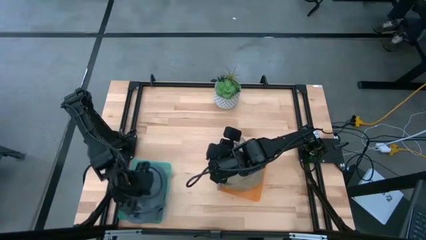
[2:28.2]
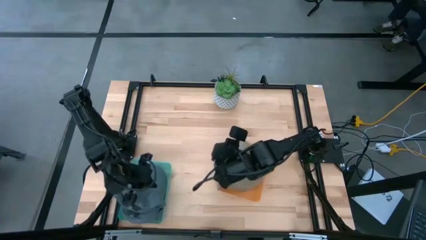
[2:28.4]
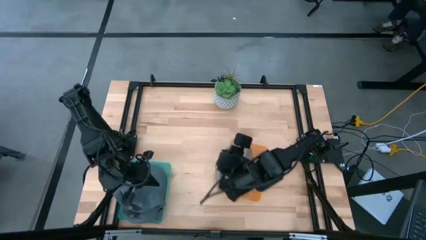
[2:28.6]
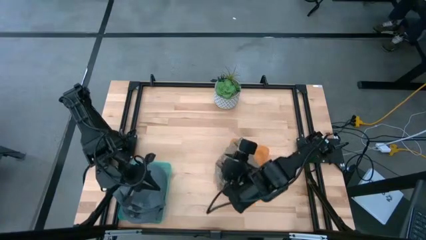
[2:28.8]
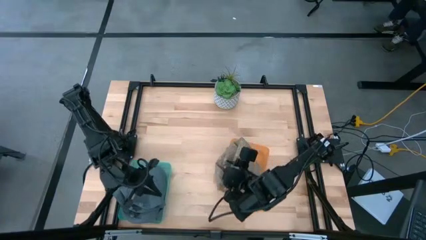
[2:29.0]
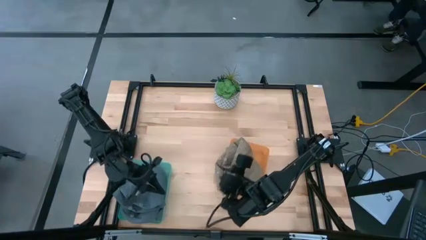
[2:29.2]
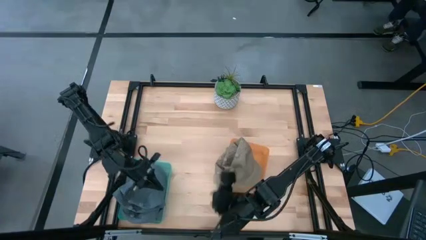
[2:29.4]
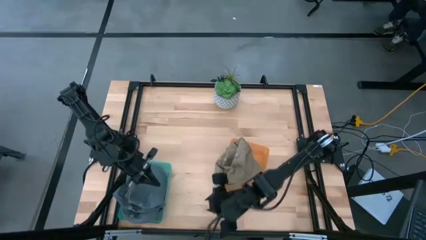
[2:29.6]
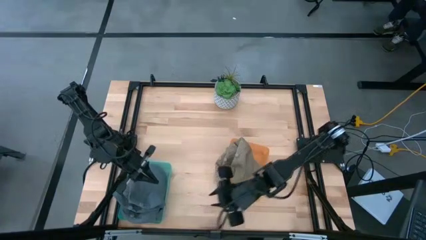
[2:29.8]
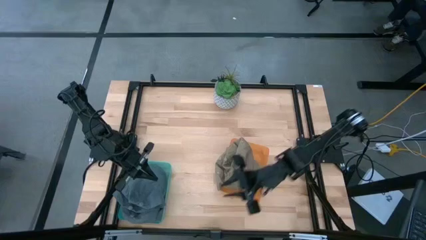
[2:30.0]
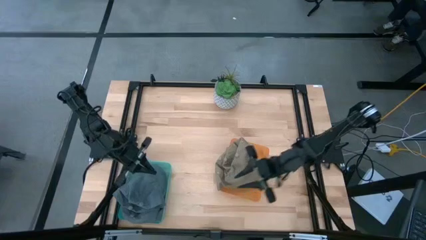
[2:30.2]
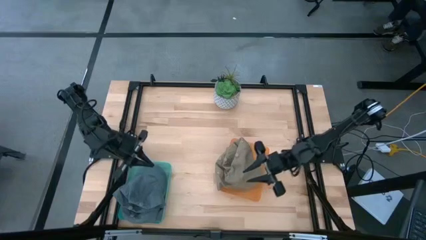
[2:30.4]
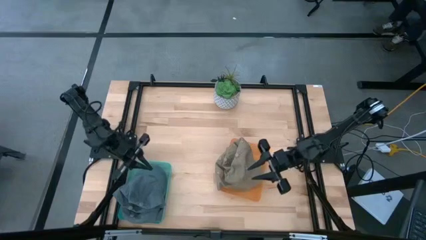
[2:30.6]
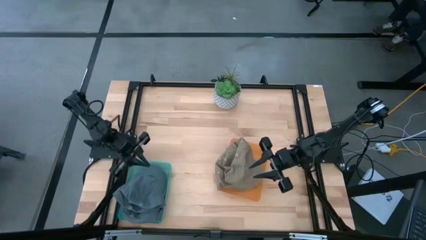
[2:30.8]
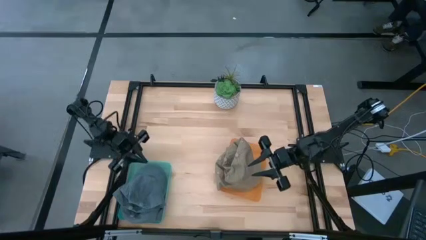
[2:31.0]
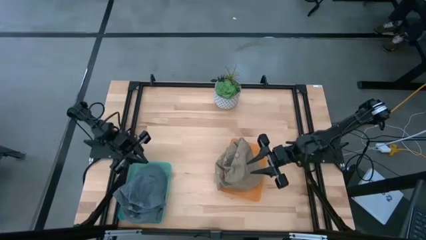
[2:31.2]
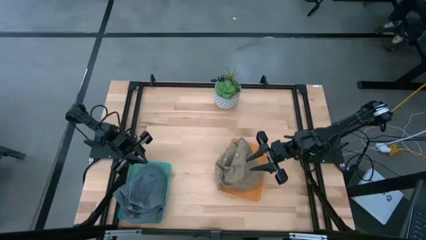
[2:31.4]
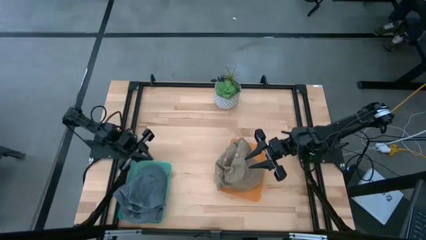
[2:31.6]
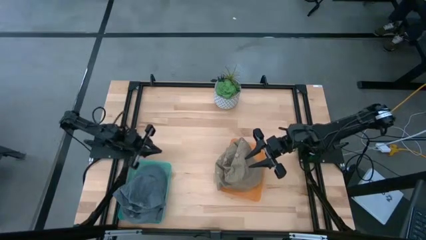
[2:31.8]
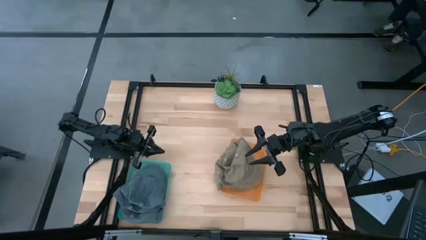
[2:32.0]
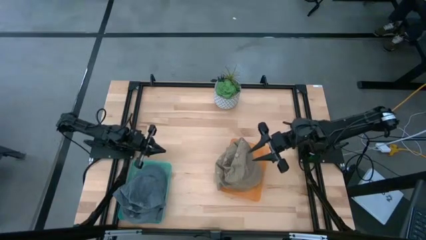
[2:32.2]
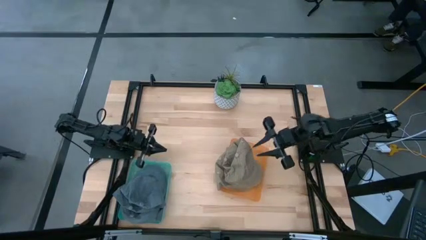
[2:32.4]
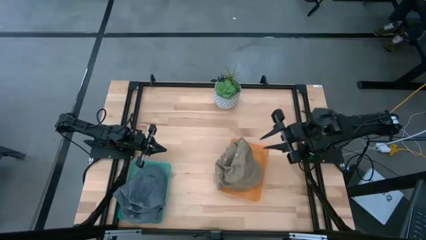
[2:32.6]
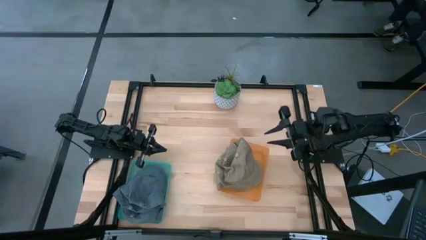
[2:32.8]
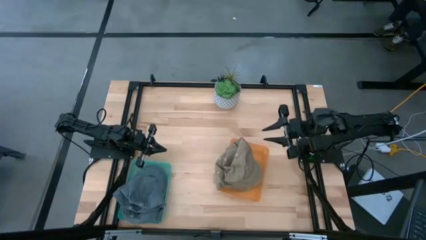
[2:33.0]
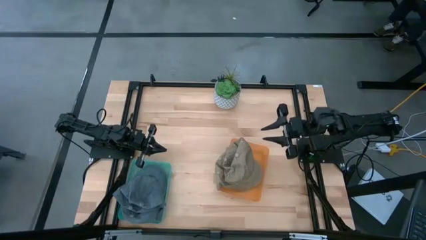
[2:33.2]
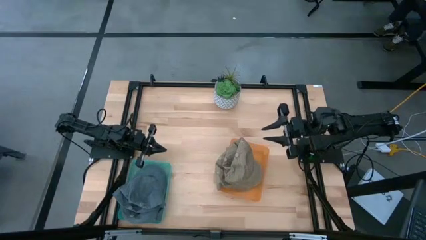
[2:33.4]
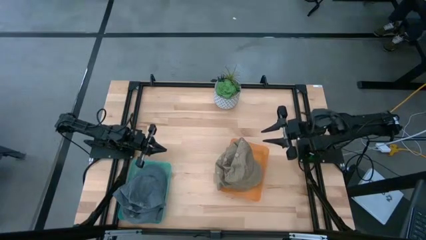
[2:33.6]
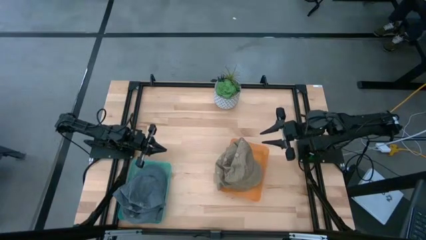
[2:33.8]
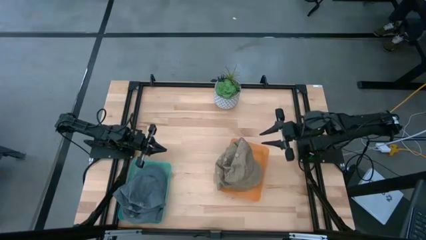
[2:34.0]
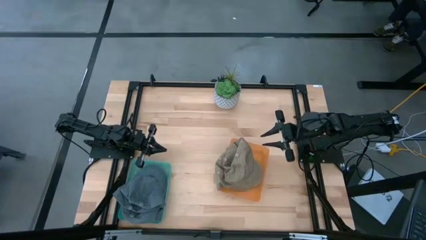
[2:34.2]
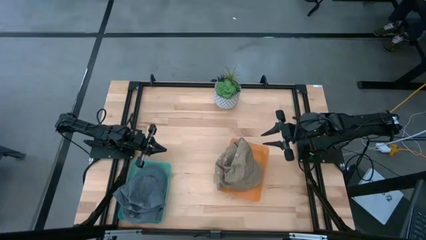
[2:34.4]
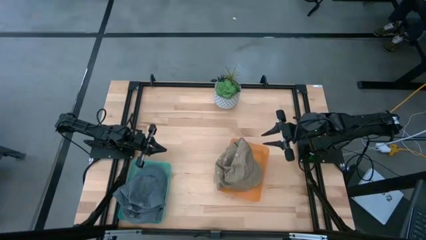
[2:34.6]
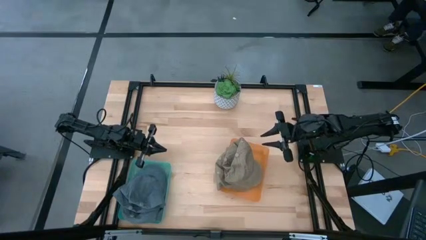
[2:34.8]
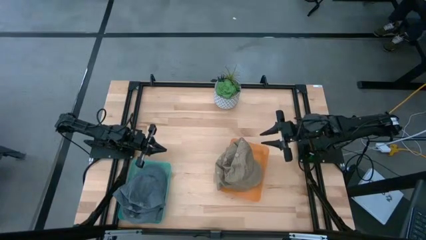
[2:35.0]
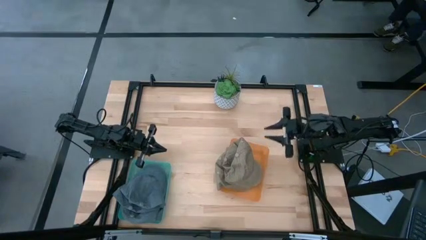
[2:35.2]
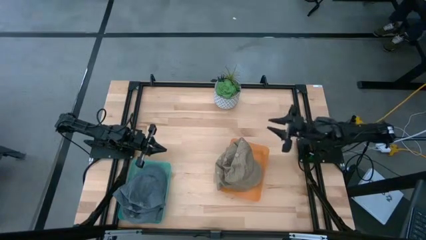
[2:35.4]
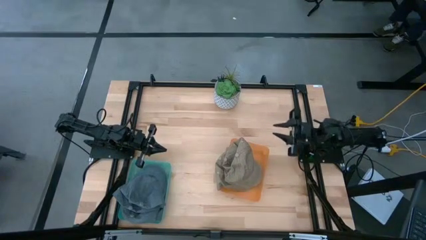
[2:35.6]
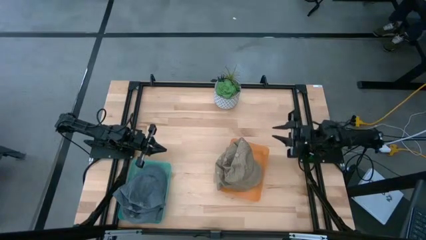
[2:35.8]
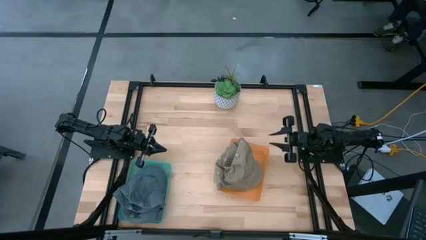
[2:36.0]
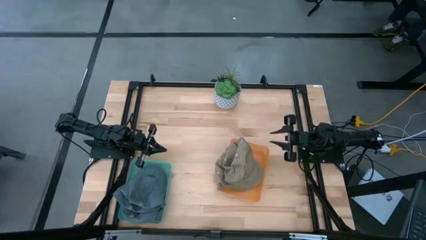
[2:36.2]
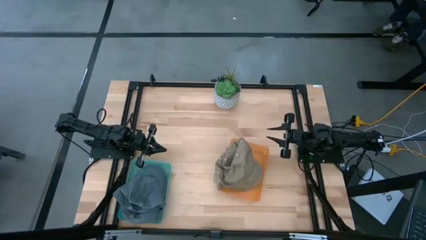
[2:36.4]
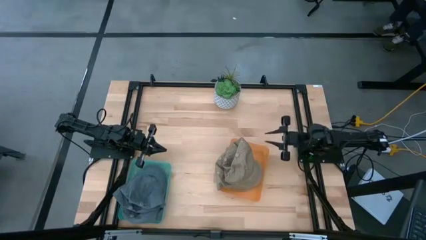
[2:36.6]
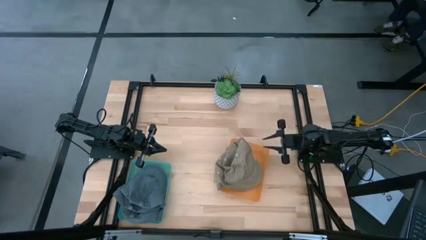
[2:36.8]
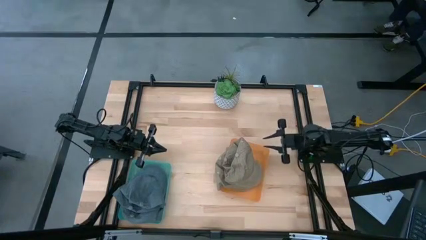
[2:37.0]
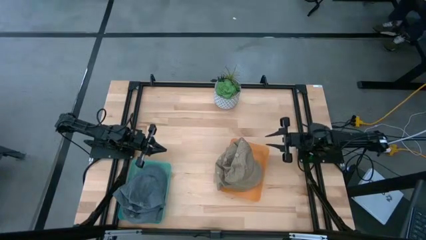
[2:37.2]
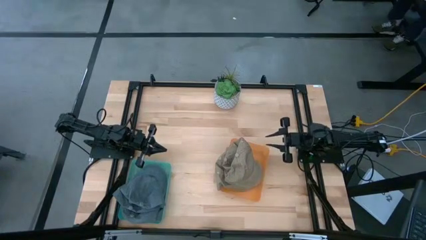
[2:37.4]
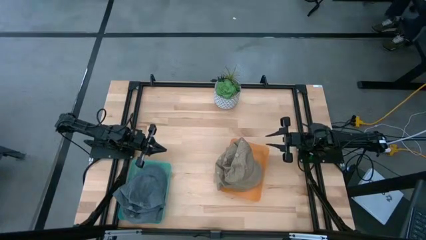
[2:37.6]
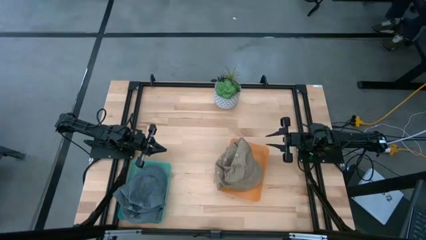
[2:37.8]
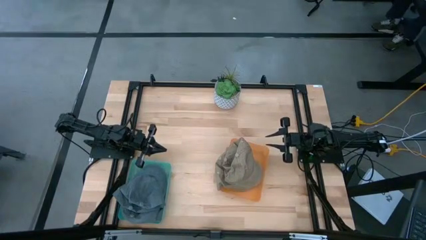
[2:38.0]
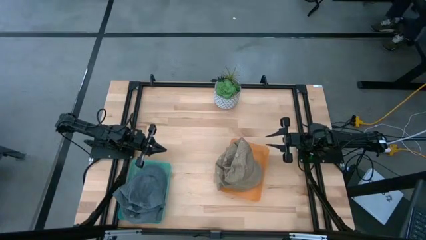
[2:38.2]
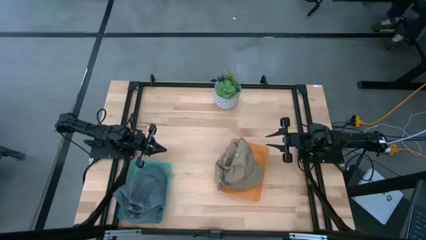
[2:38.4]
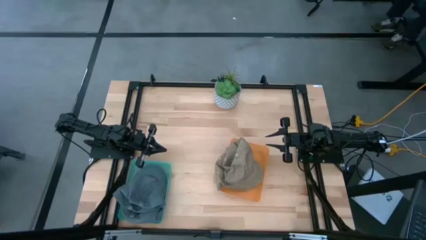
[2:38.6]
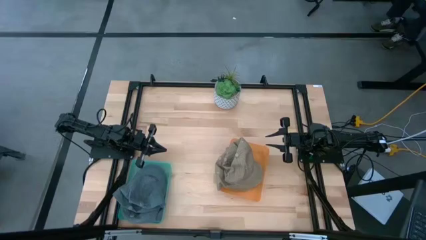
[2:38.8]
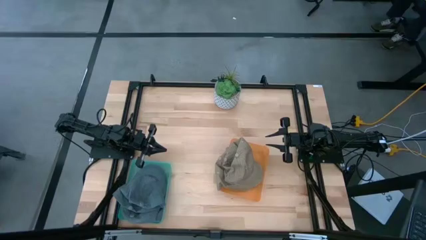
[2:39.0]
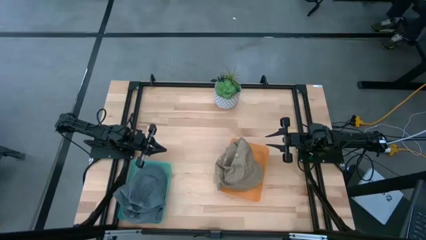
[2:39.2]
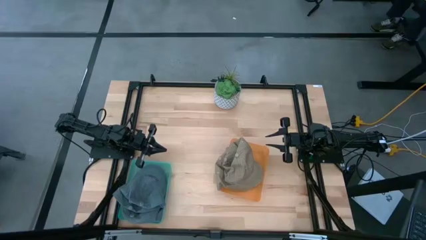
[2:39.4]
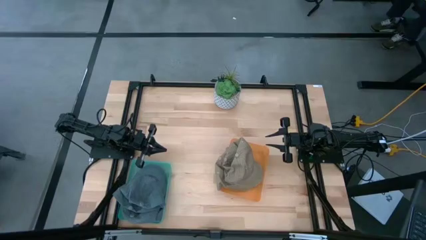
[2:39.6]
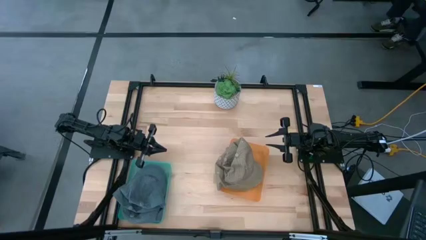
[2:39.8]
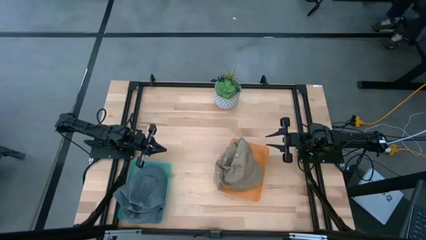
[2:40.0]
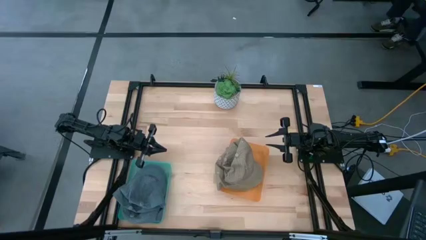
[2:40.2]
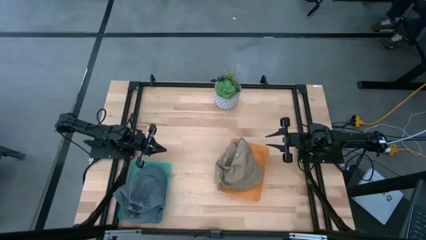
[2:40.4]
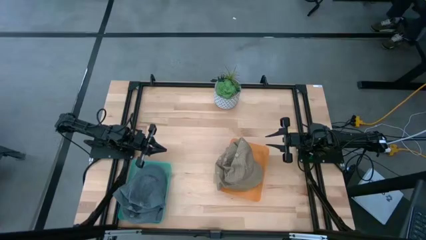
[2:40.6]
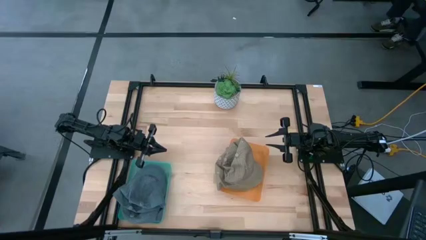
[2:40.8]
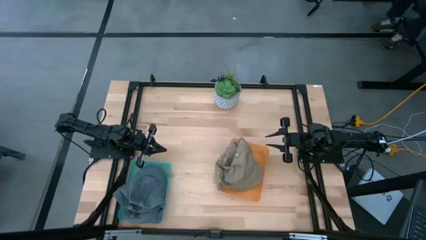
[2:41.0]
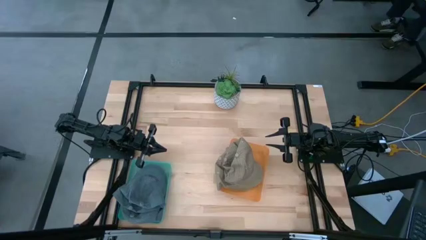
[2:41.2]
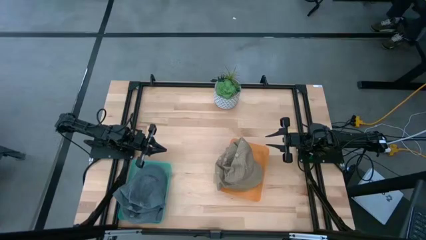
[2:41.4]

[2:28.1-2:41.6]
Task: Pick & Place hat
Return to Home Position

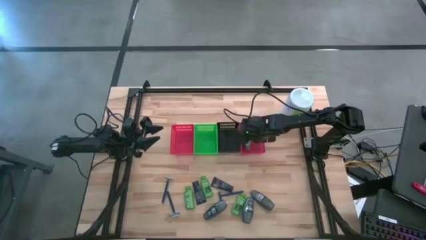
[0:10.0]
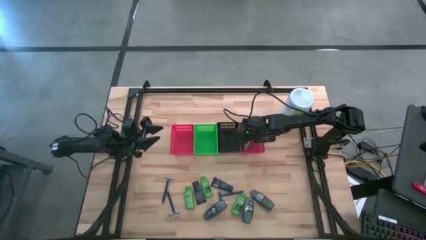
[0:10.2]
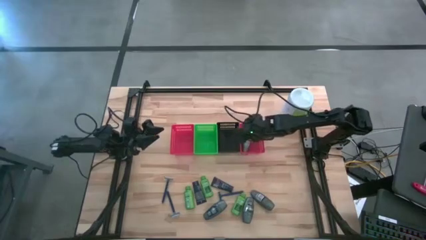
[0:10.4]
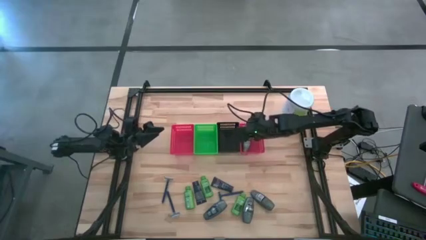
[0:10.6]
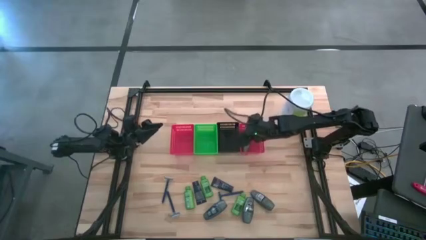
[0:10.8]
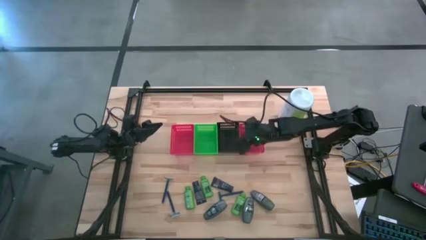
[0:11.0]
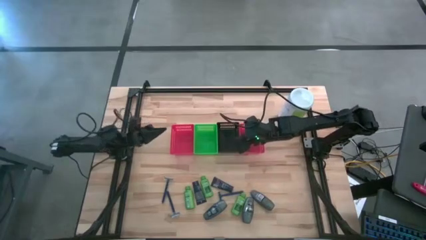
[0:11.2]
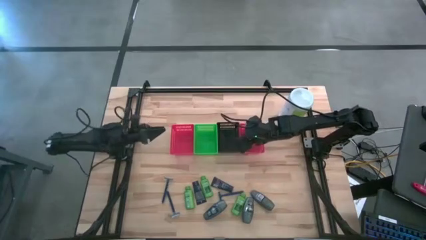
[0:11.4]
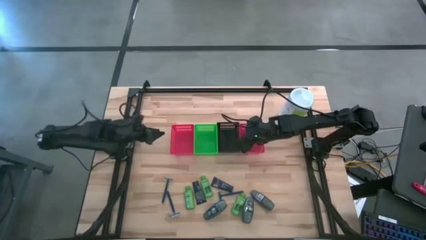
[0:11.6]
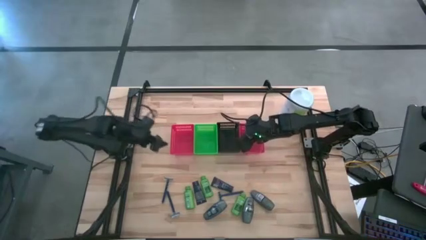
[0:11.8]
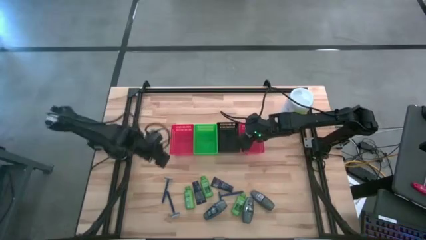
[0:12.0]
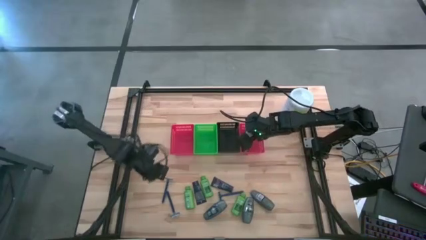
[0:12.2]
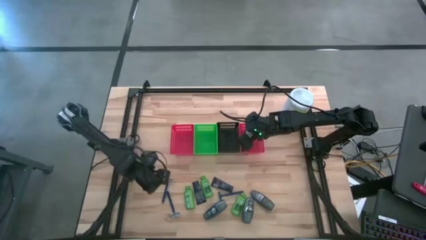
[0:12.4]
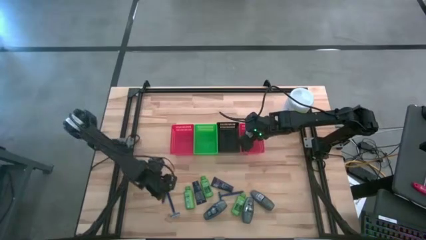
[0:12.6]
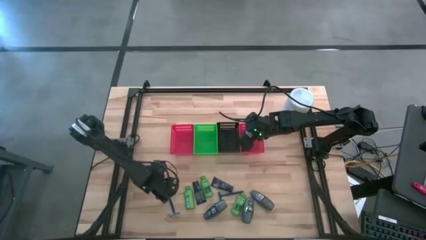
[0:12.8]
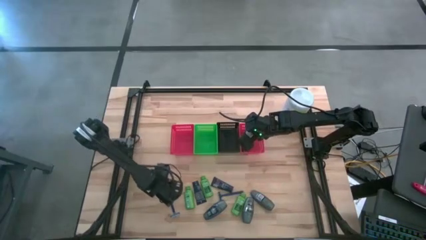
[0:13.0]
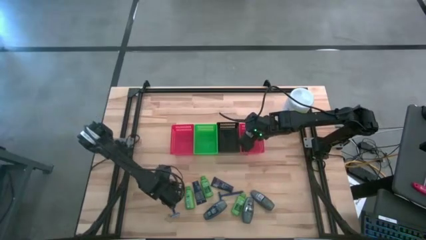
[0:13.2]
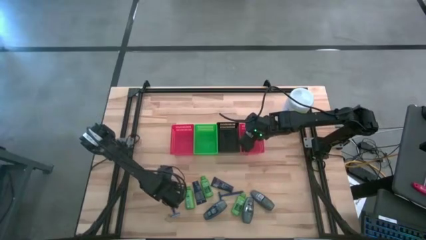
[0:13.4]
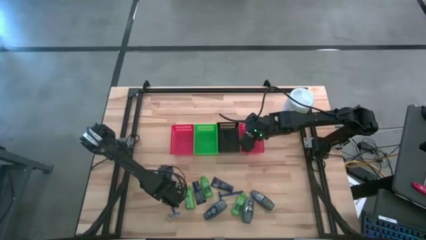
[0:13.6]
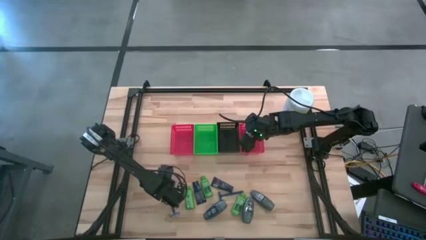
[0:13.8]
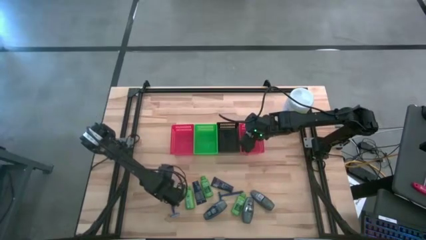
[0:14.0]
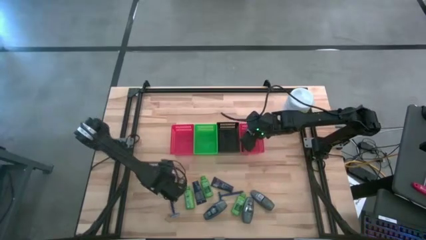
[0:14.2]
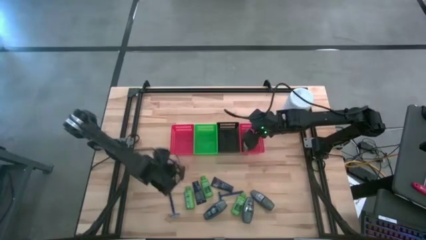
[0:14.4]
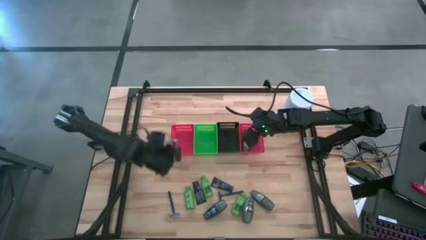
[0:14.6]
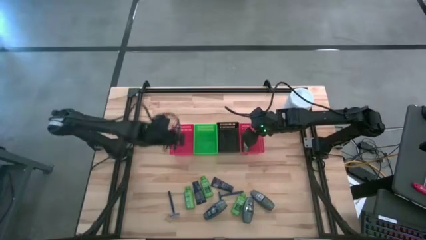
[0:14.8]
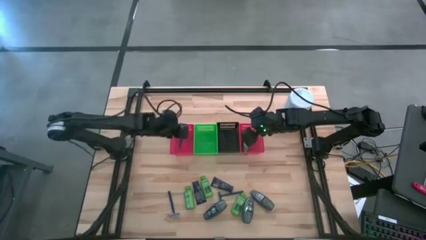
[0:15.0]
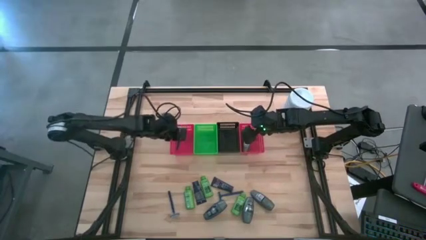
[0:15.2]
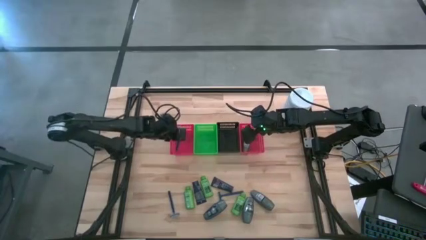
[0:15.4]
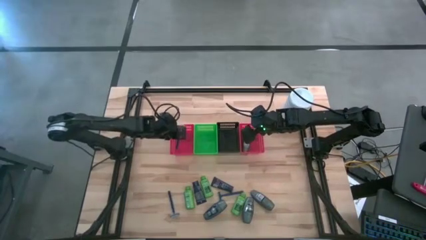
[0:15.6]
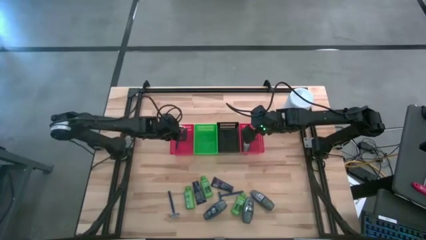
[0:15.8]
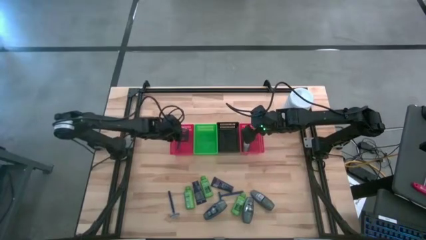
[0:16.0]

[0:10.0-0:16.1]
Task: Pick & Place Travel size toiletries
Put the top left blue razor into the left red bin
